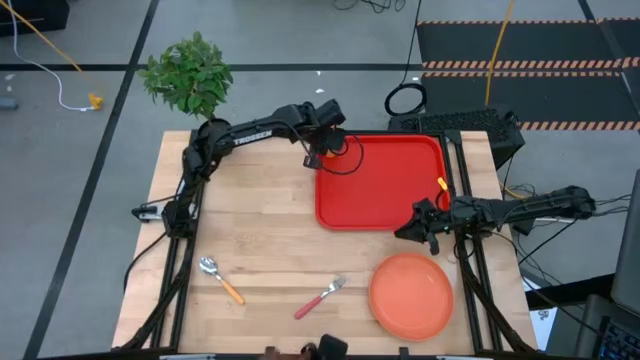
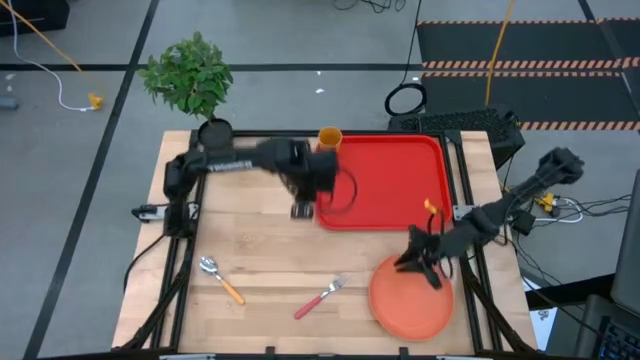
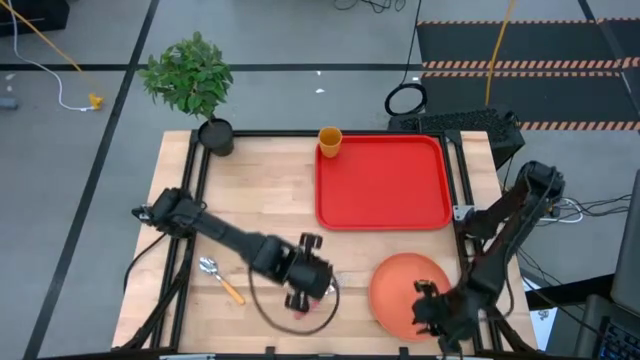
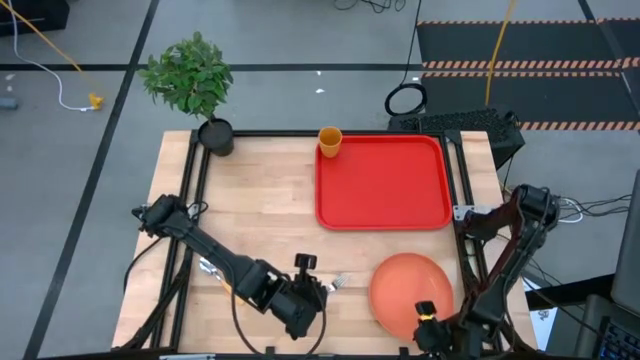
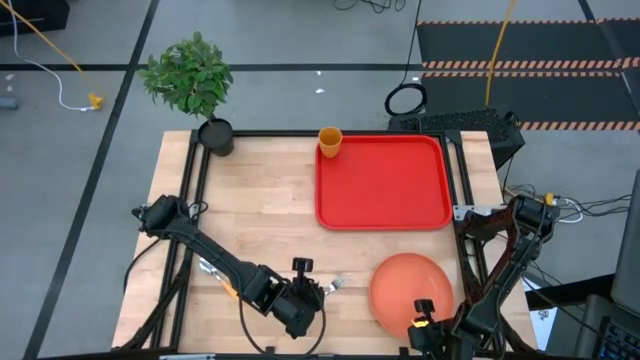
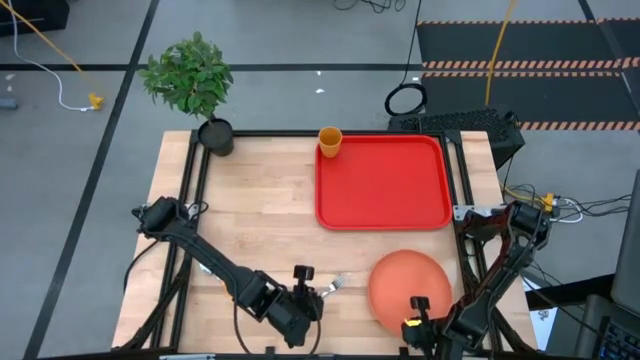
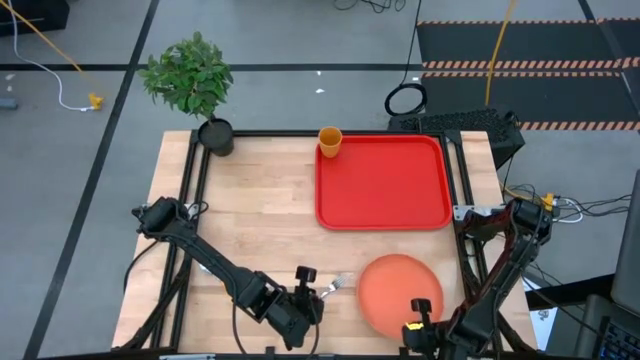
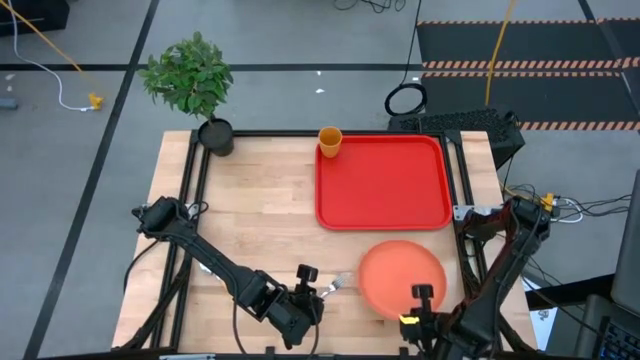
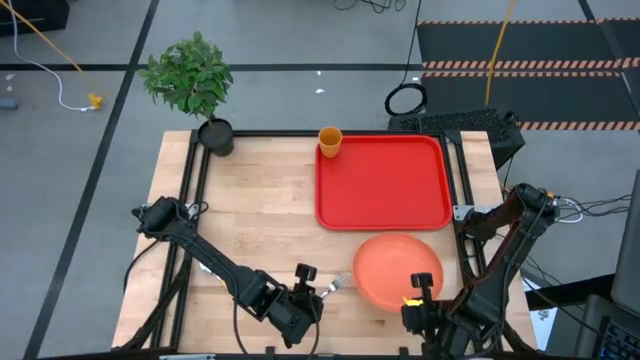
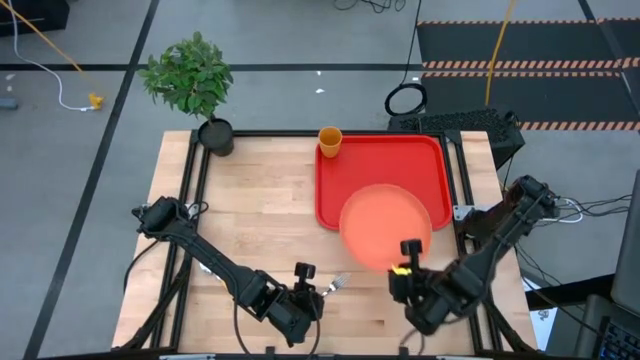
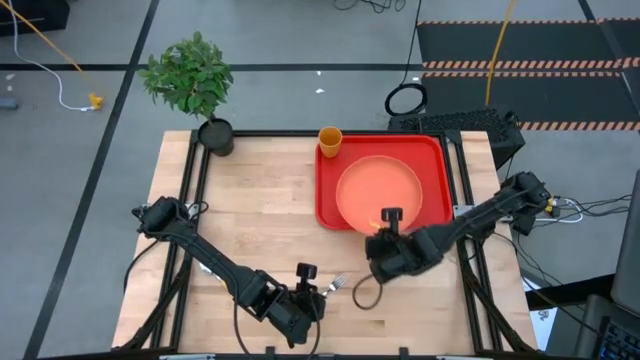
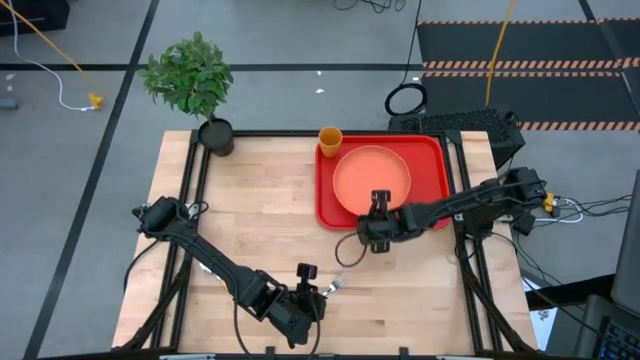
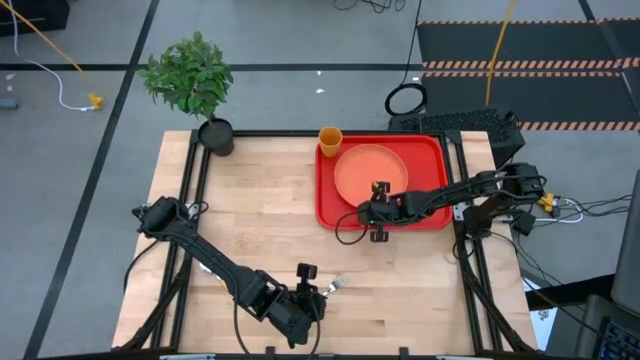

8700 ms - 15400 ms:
Task: Pick and place plate/cup/fork/spoon on tray
Put the orange plate to the bottom right of the yellow cup on the red tray

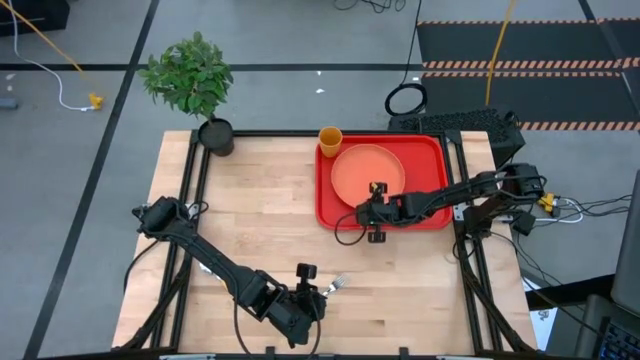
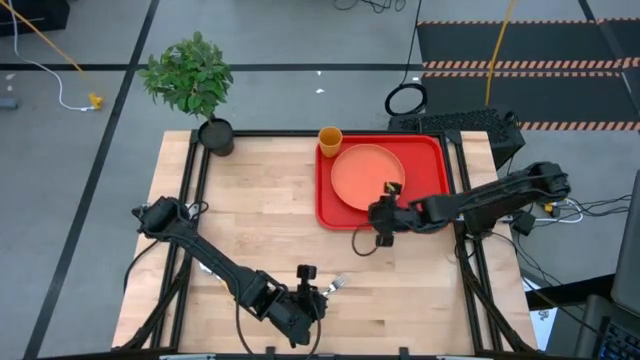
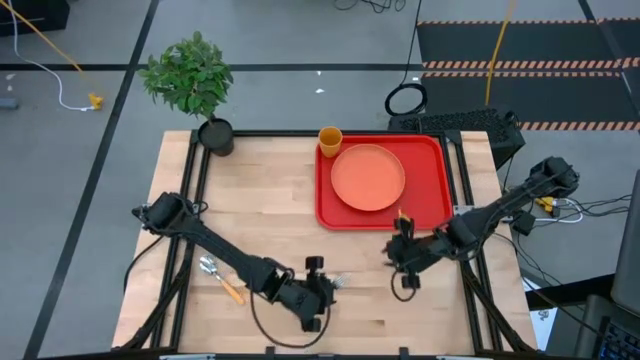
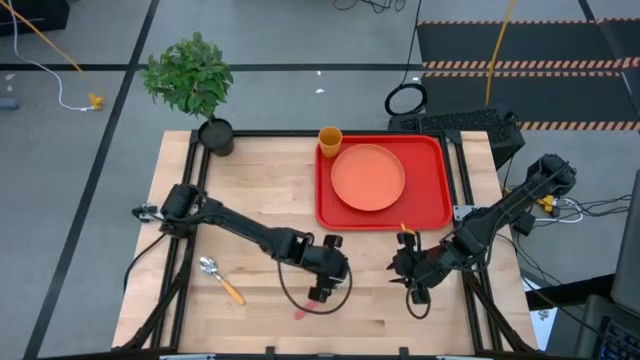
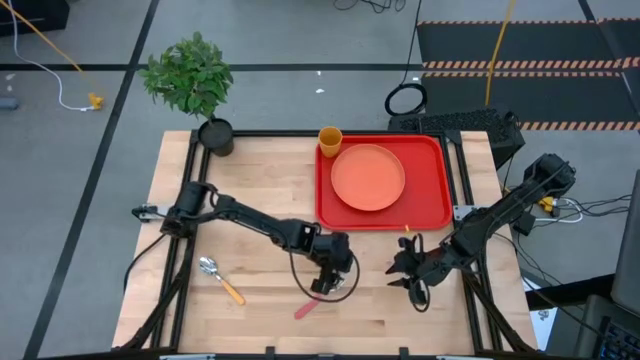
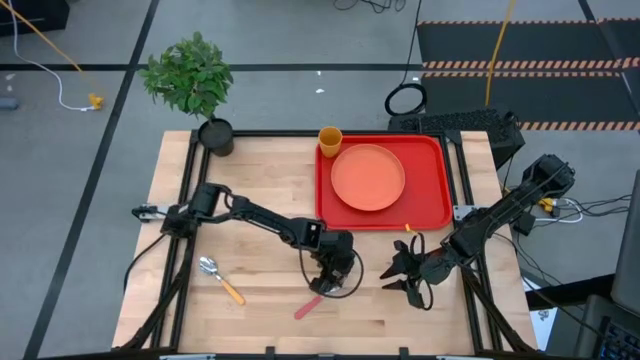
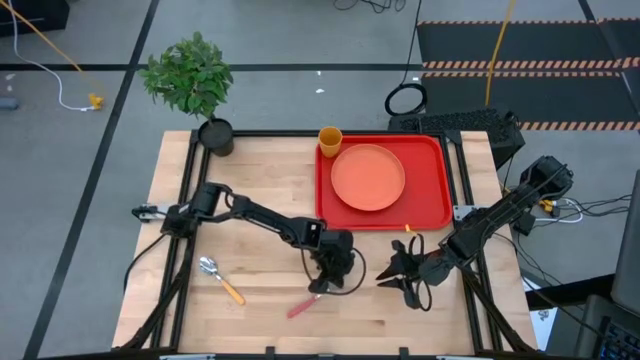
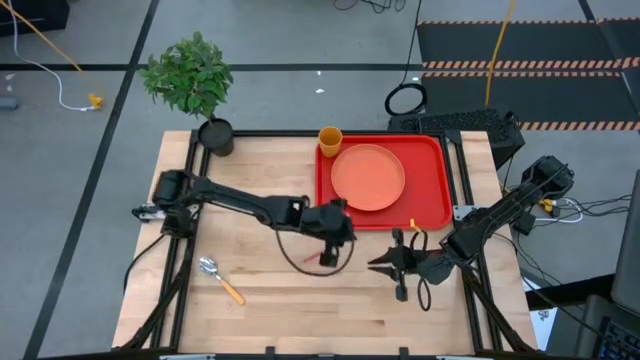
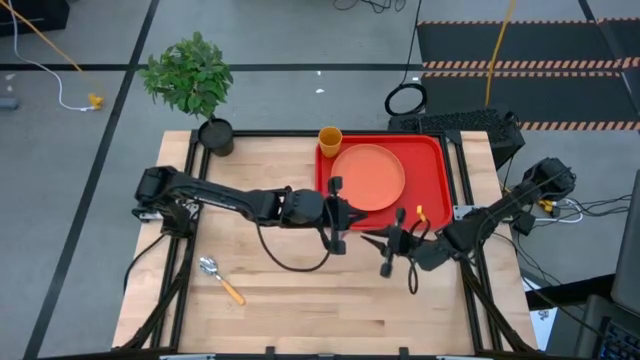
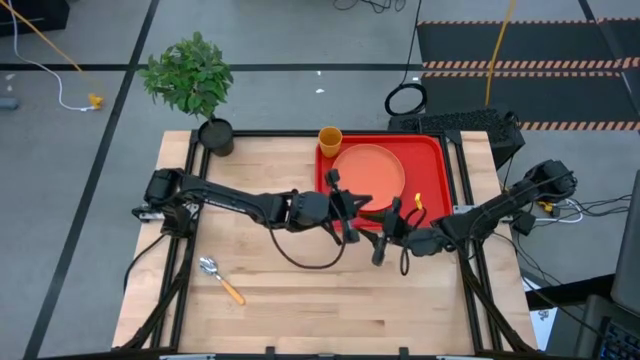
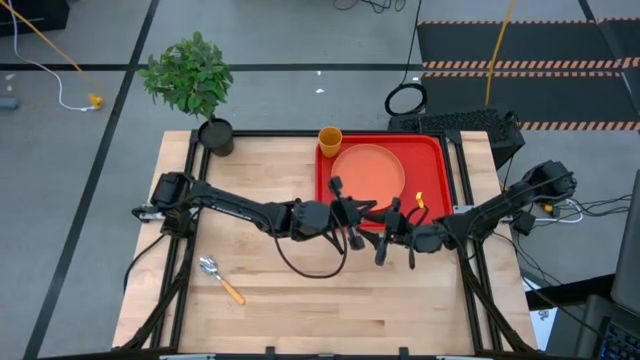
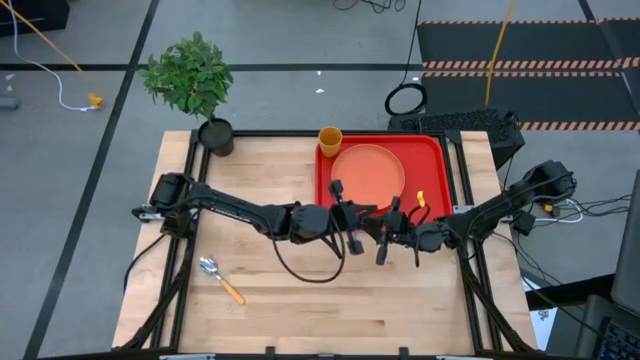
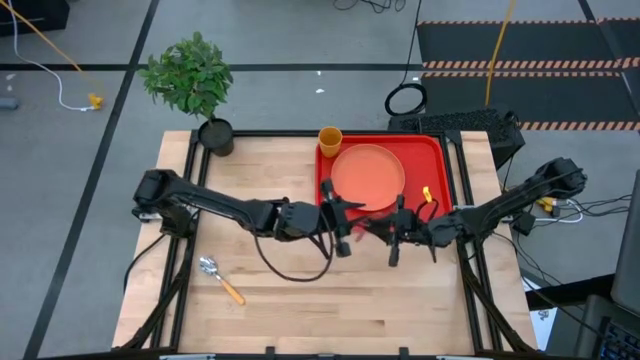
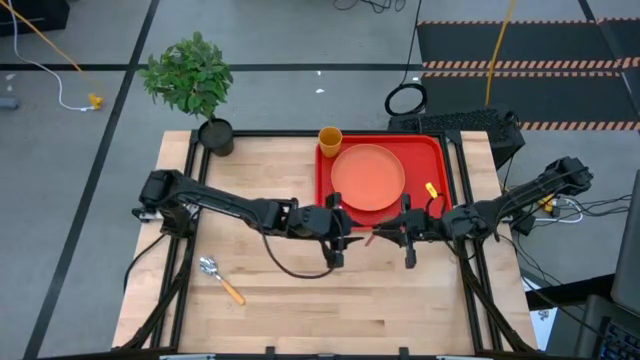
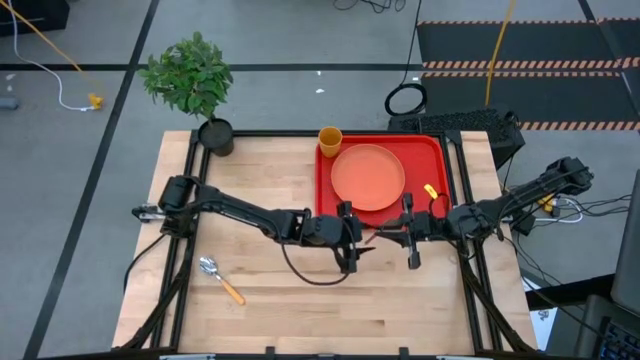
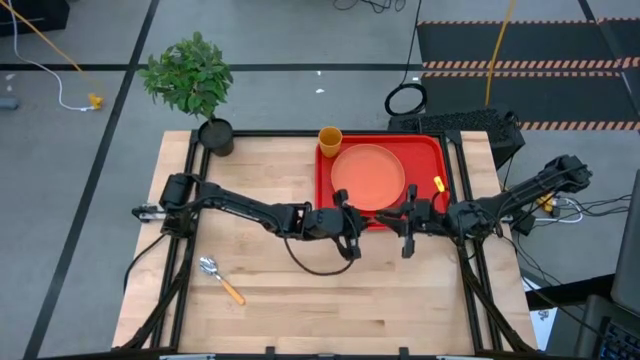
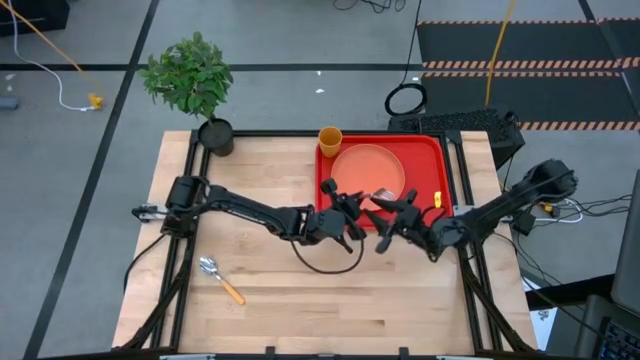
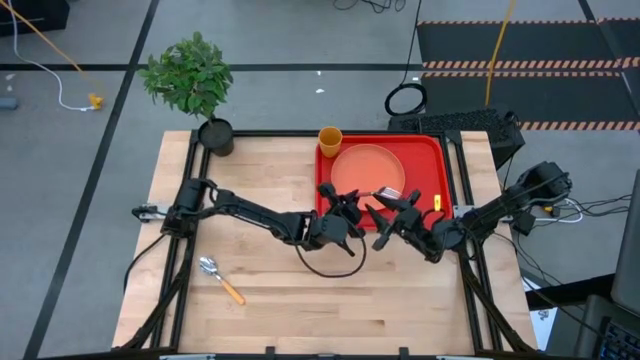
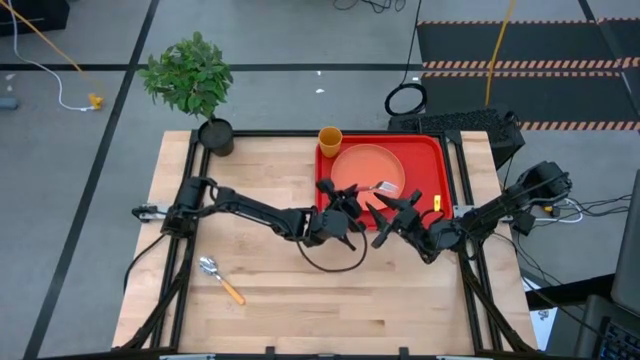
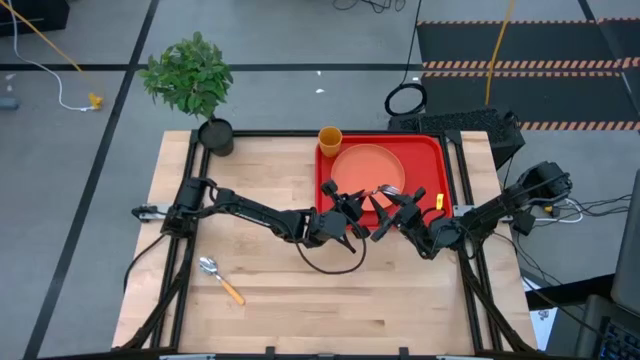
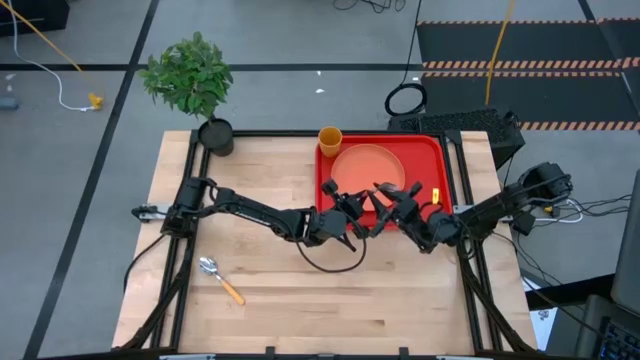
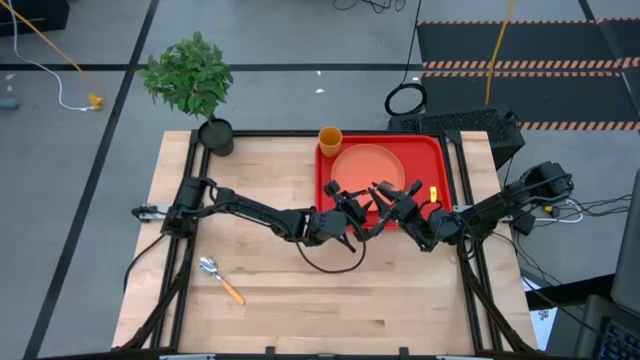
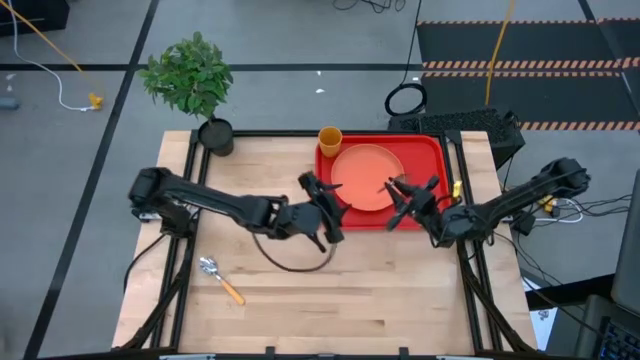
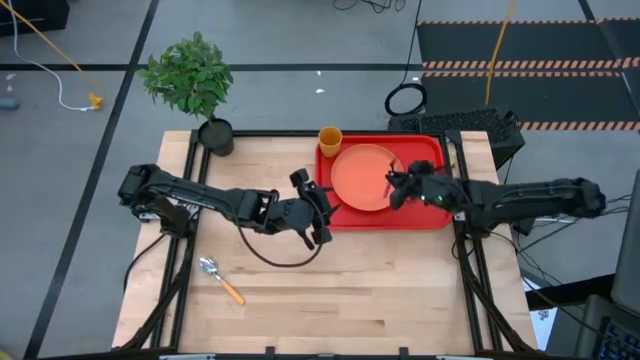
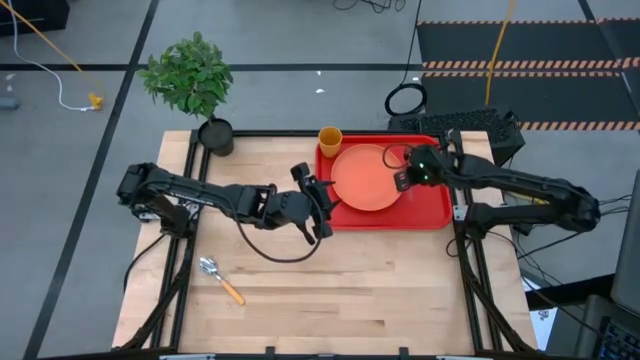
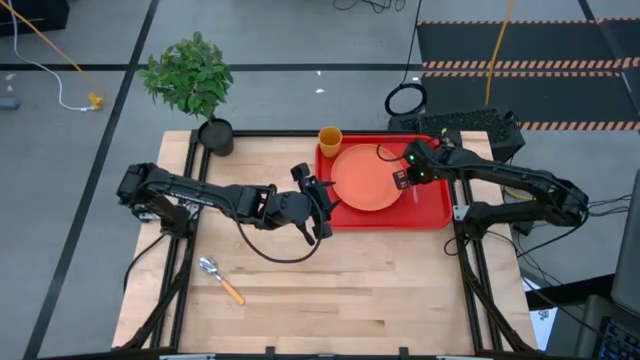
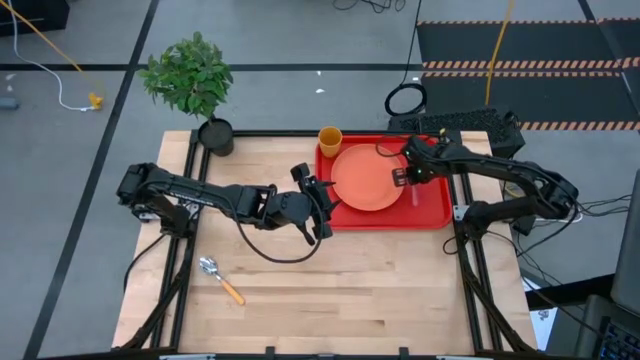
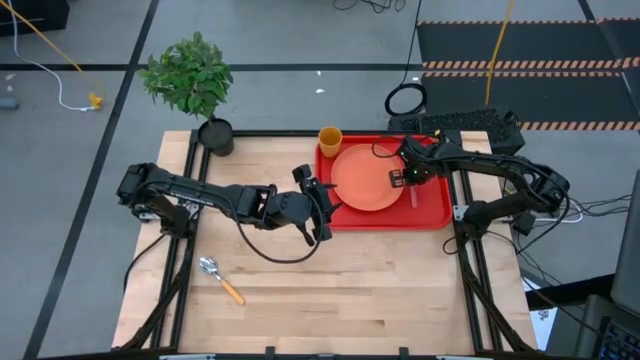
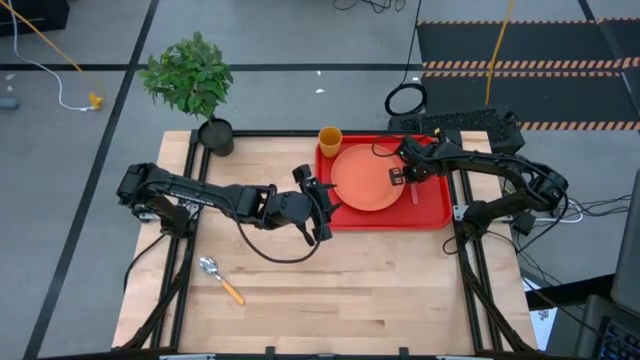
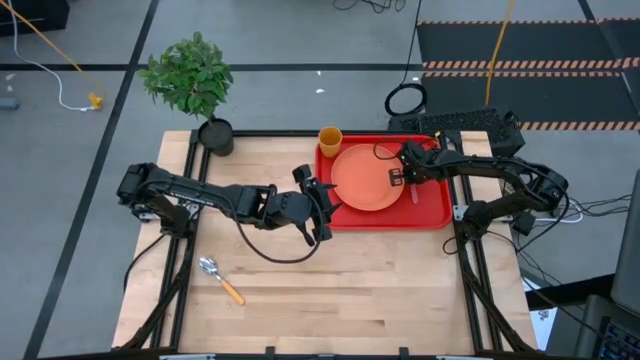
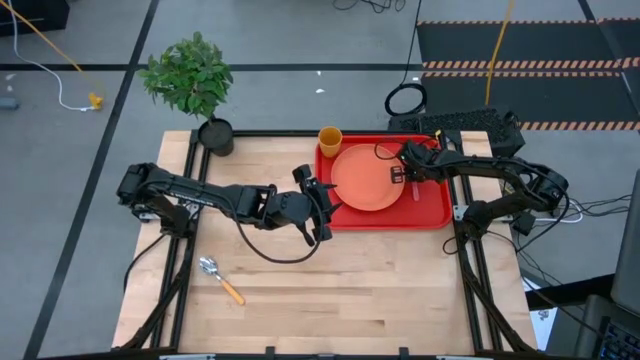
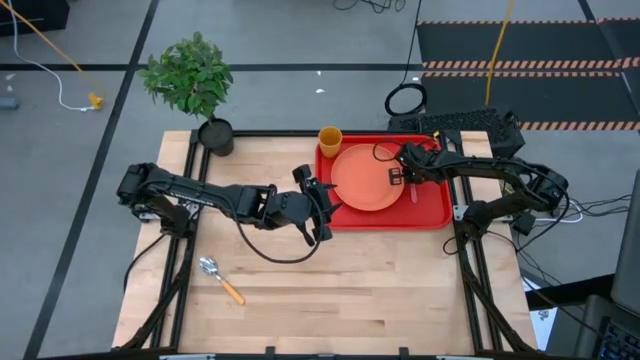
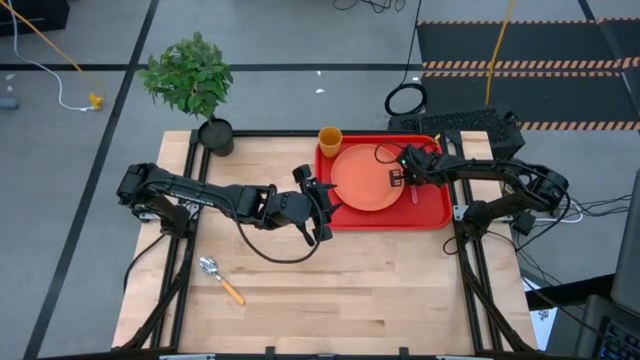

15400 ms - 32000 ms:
Put the pink fork to the right of the orange plate on the red tray
